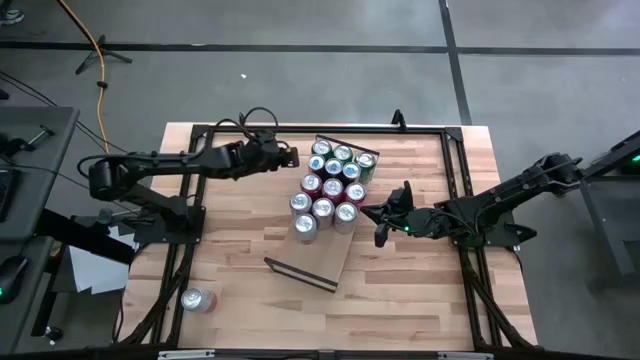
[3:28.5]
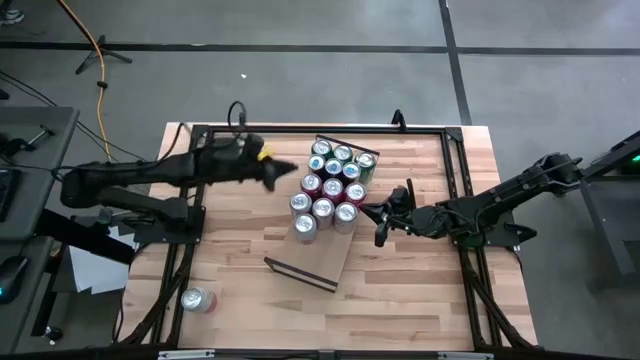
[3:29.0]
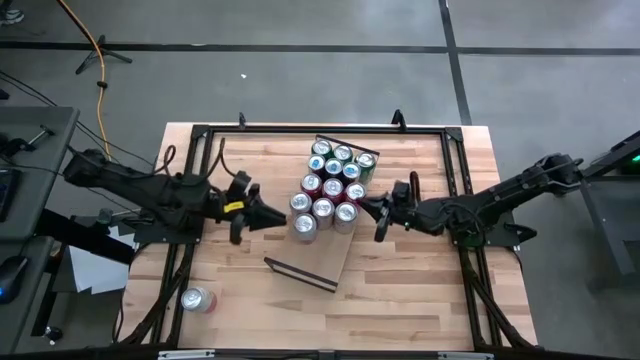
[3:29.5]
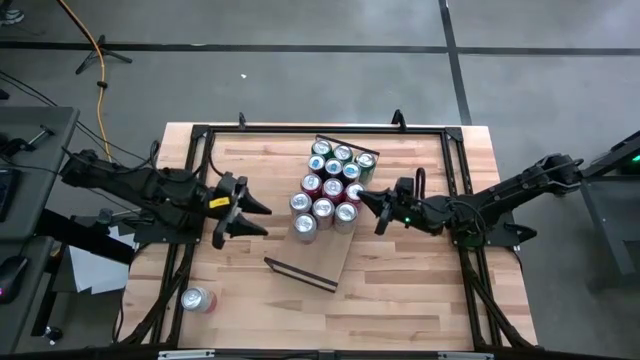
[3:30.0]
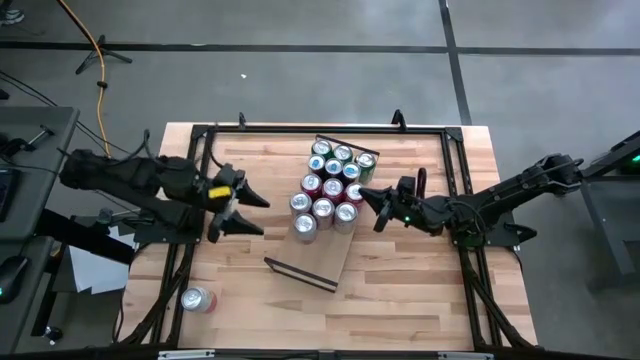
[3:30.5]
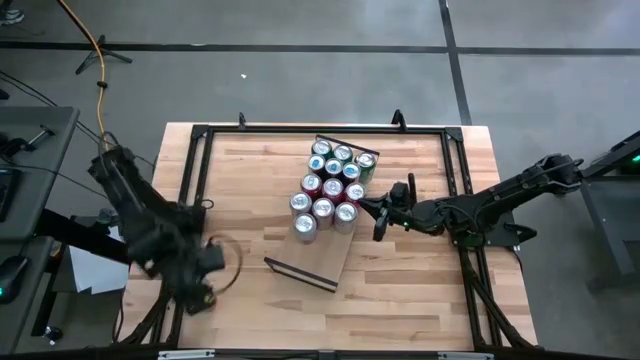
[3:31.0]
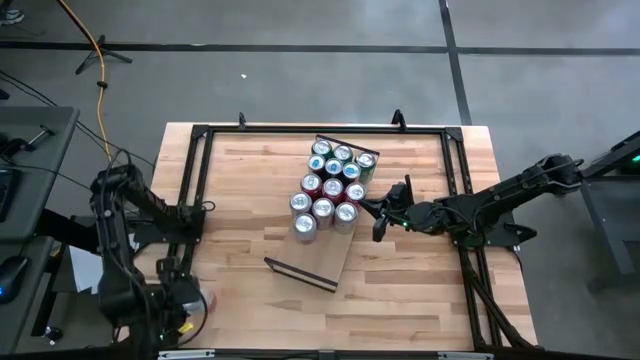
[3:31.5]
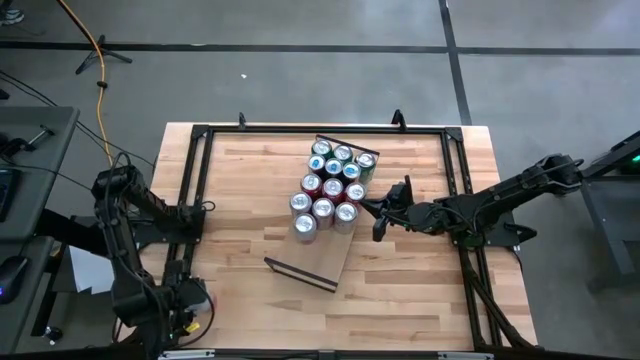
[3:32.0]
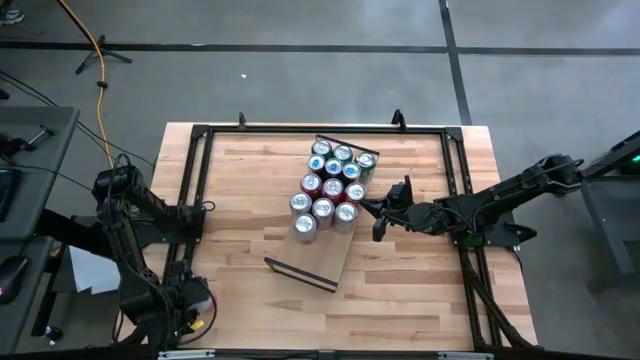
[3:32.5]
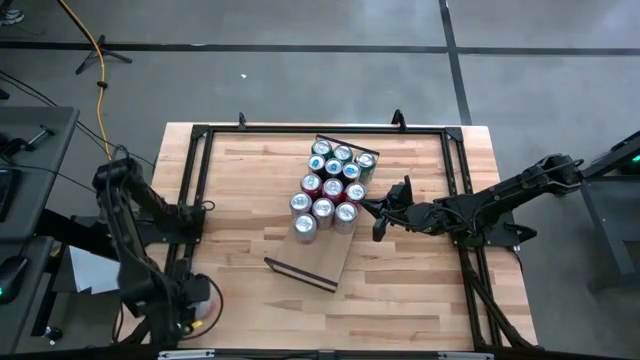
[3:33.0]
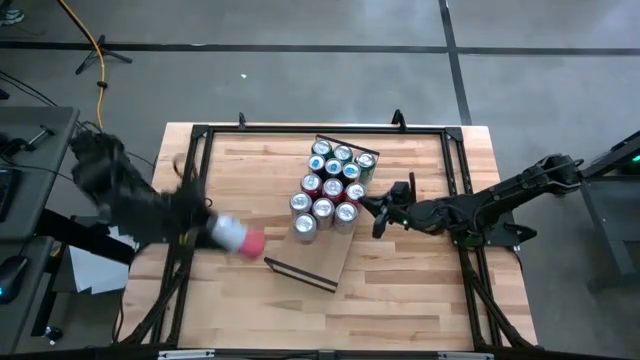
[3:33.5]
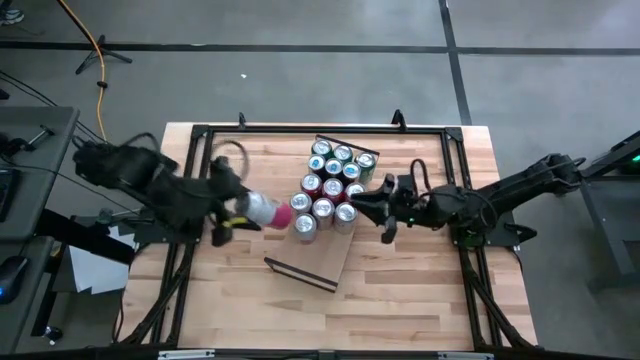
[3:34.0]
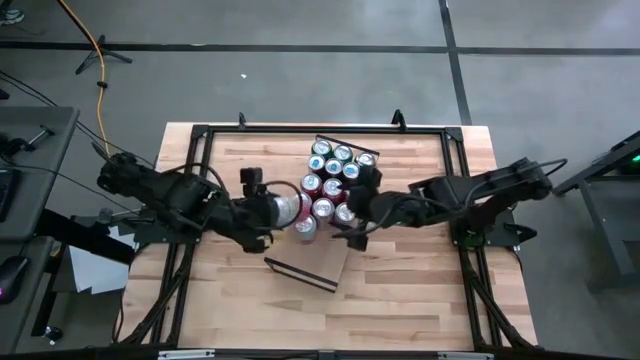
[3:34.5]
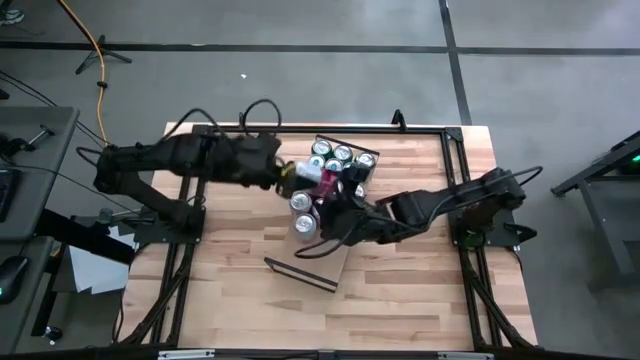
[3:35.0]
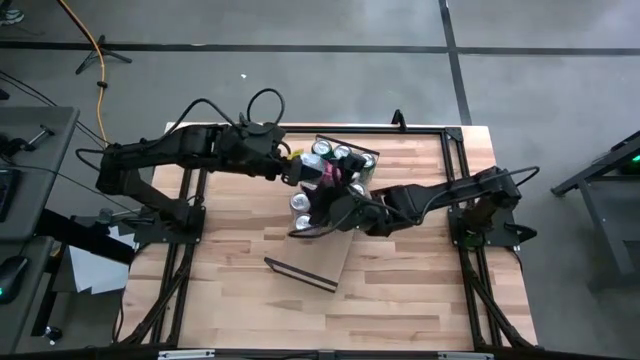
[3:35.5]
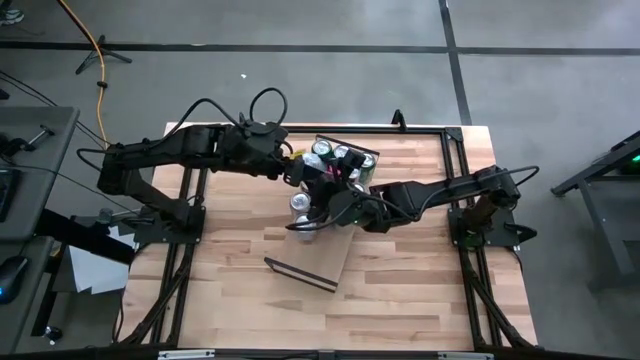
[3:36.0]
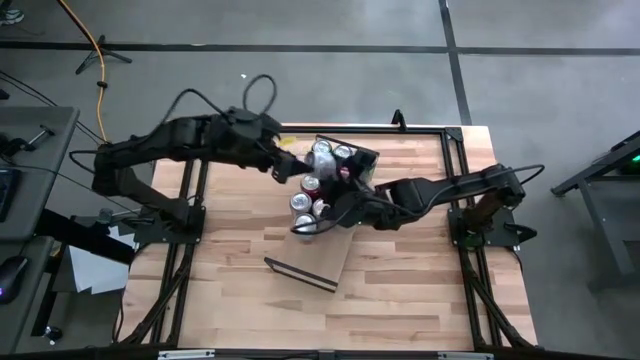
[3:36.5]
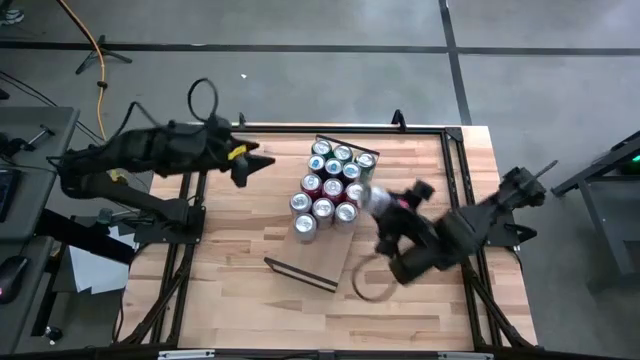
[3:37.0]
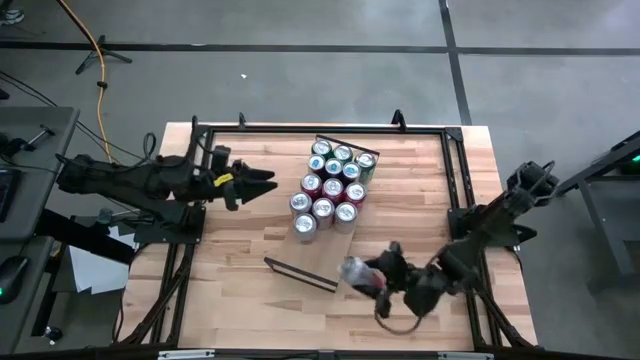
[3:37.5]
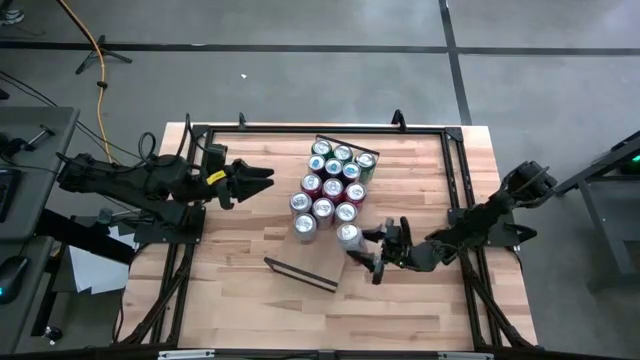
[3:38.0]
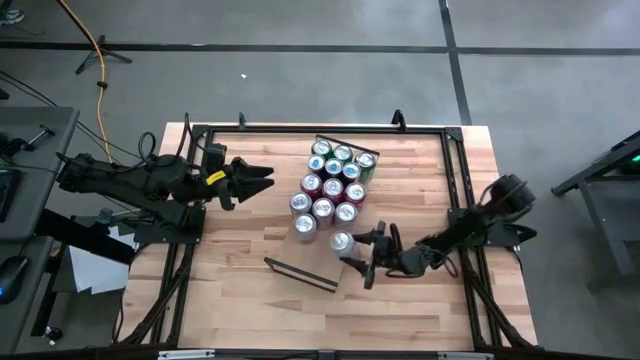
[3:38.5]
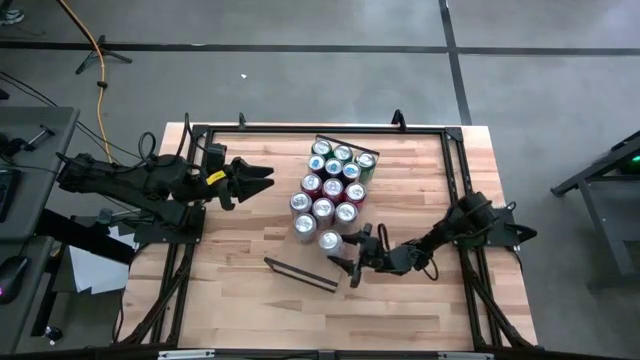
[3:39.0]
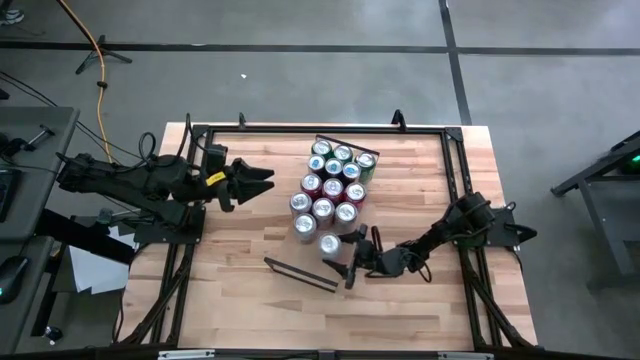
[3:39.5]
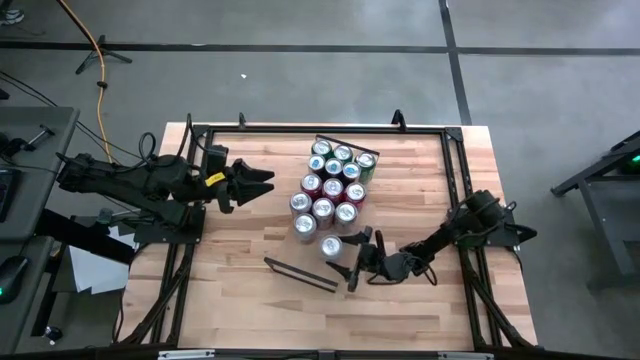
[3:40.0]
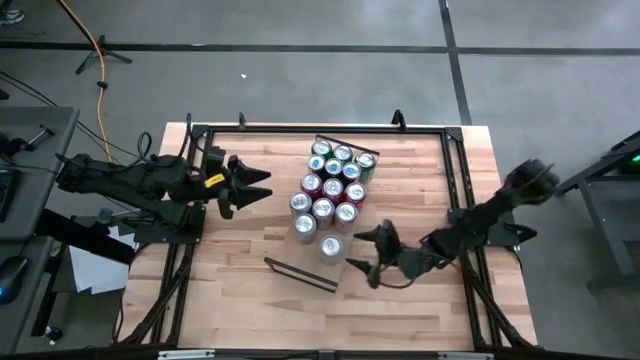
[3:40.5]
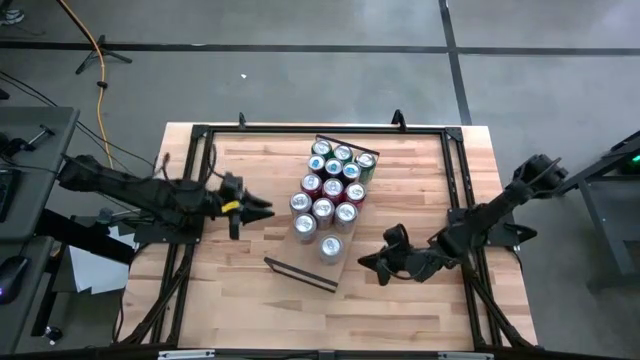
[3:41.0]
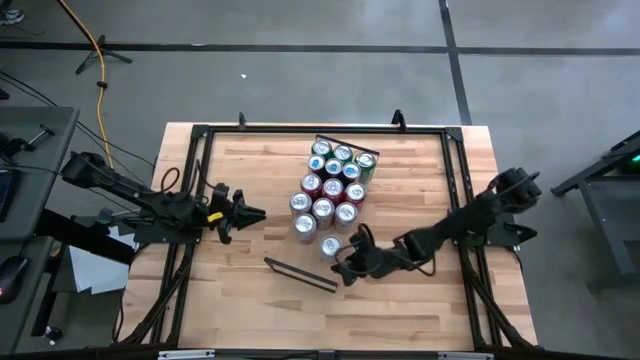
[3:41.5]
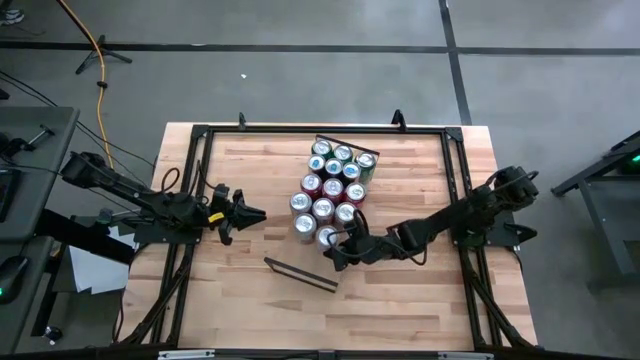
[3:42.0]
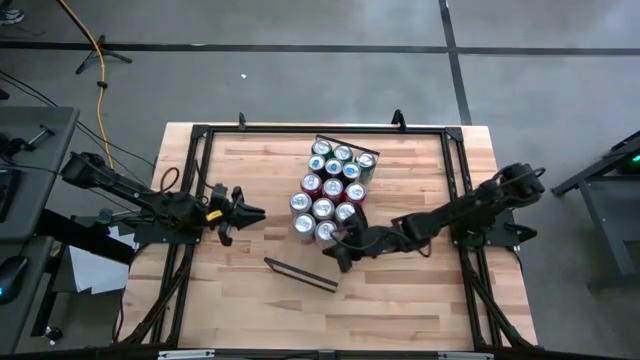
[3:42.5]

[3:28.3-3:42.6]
Task: Place canned beverage on shelf
Put the white and pink soda can on the shelf aligned with the other white and pink soda can
